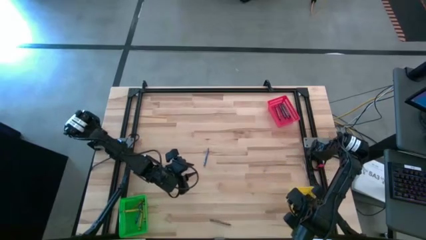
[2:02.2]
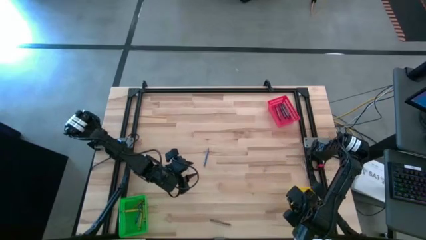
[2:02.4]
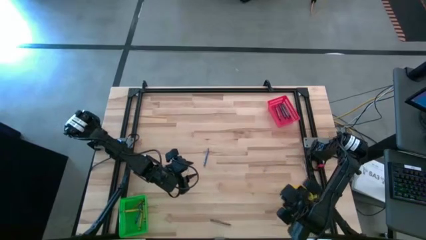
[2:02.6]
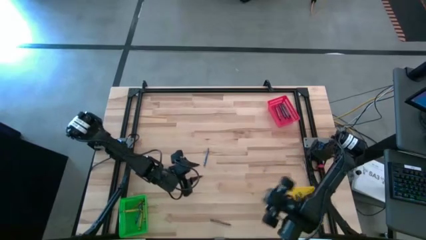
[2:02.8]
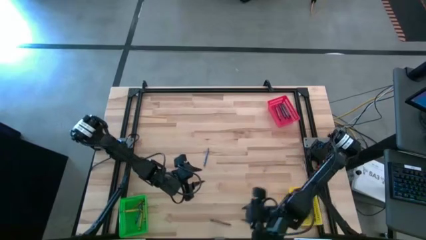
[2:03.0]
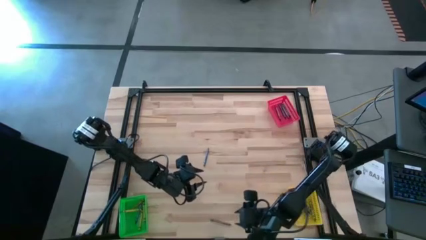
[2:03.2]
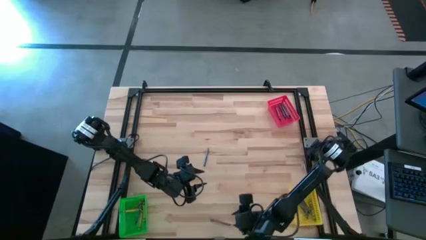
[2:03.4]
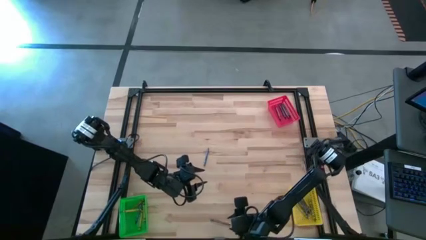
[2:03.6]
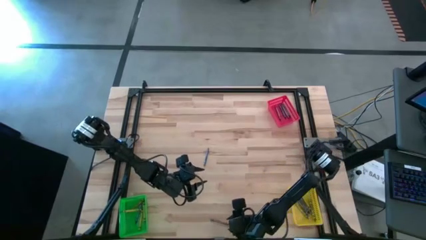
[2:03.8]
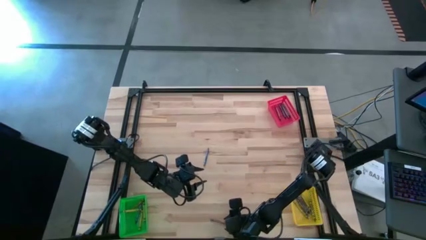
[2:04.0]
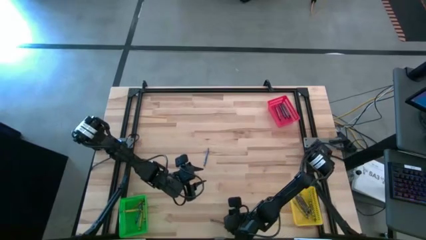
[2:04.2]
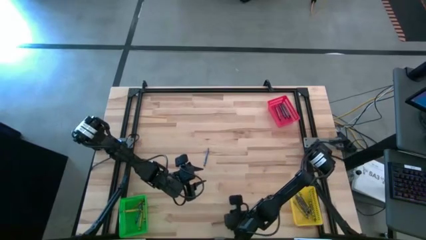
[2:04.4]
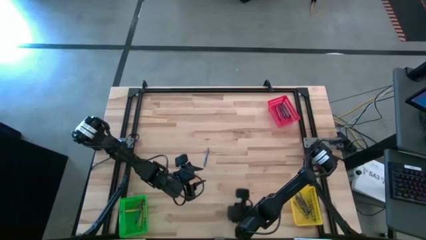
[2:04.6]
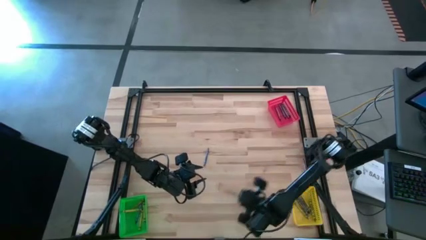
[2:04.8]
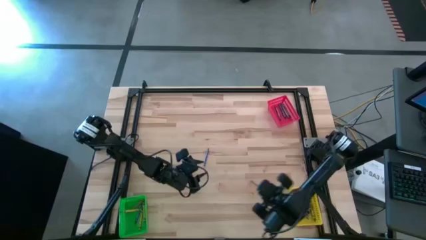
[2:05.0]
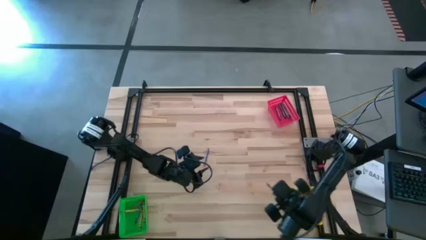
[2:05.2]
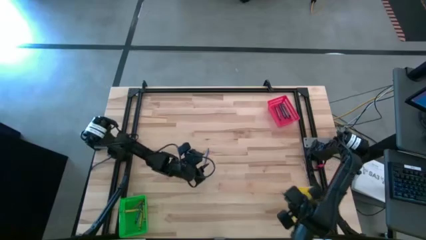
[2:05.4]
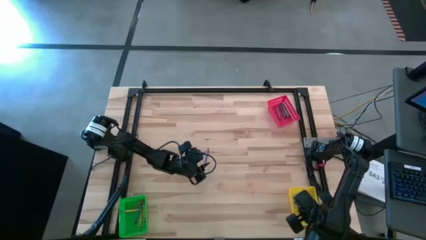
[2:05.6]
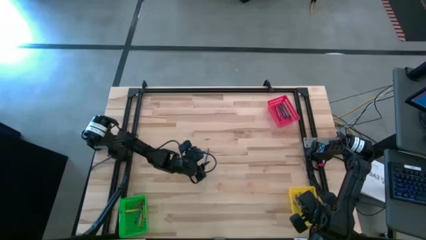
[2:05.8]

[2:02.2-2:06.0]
Task: Sort crayons
Put the brown crayon into the yellow bin

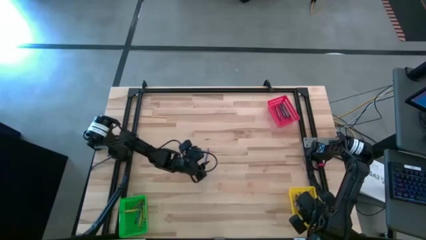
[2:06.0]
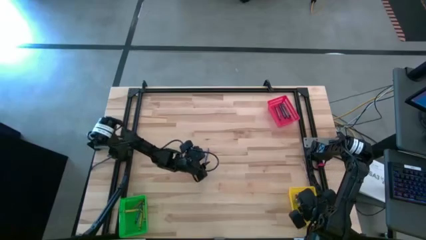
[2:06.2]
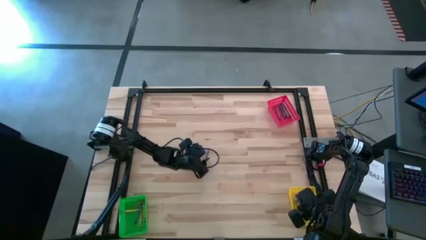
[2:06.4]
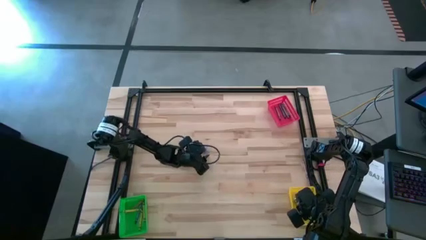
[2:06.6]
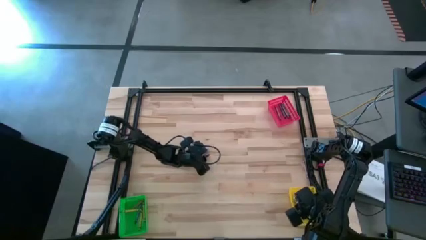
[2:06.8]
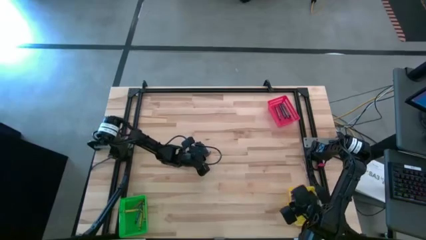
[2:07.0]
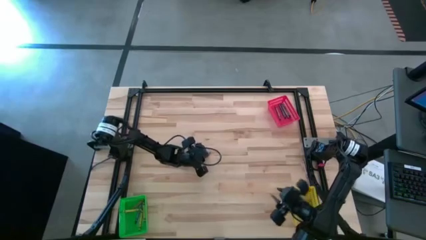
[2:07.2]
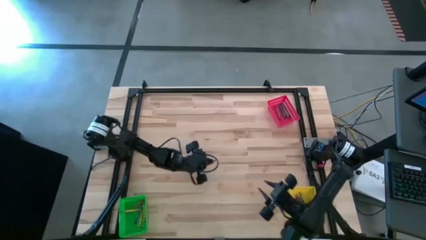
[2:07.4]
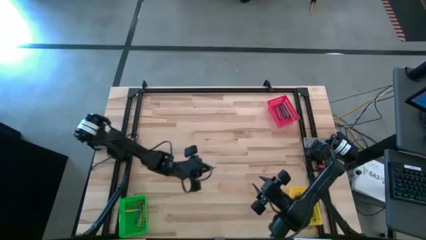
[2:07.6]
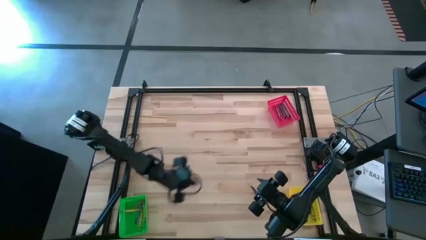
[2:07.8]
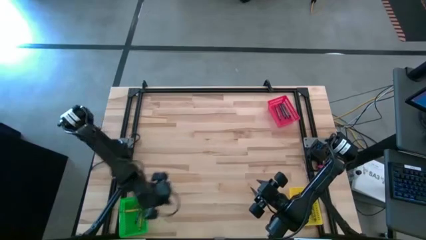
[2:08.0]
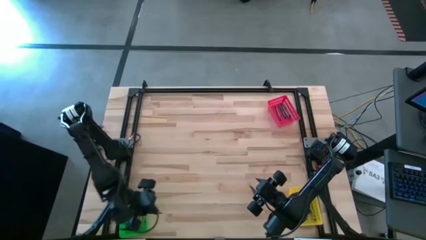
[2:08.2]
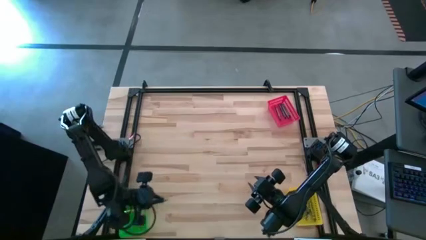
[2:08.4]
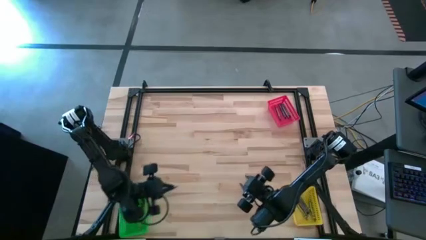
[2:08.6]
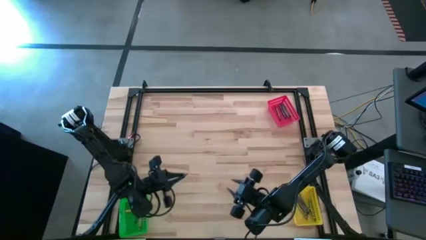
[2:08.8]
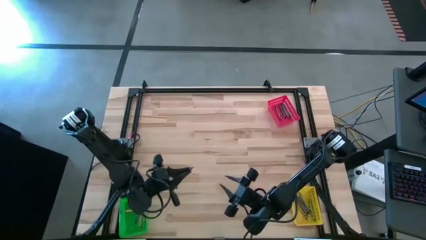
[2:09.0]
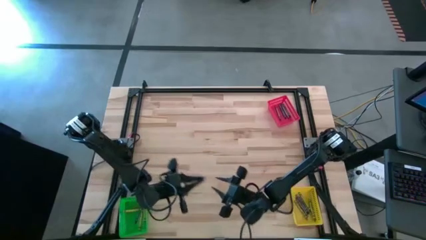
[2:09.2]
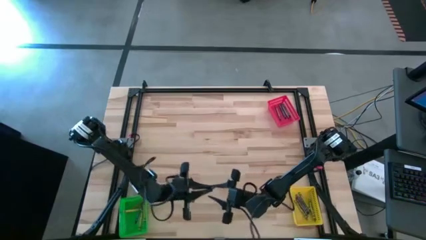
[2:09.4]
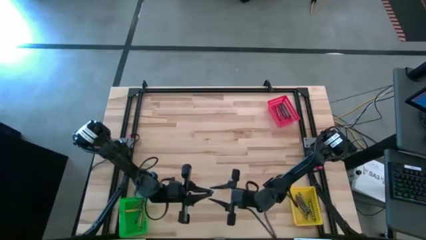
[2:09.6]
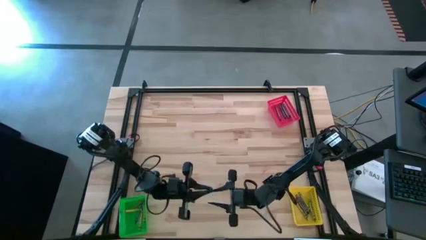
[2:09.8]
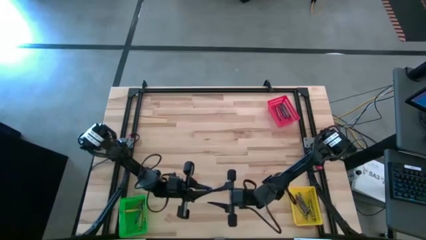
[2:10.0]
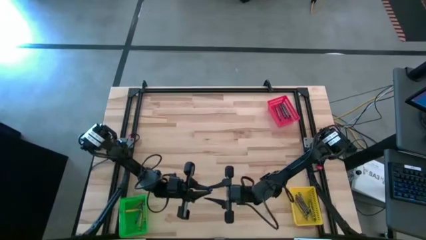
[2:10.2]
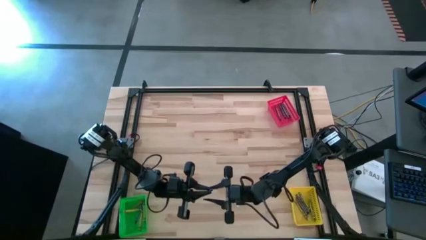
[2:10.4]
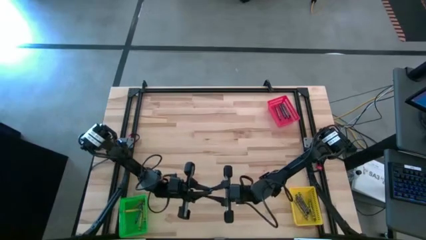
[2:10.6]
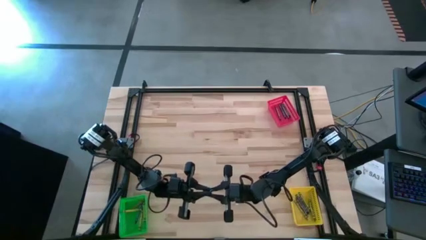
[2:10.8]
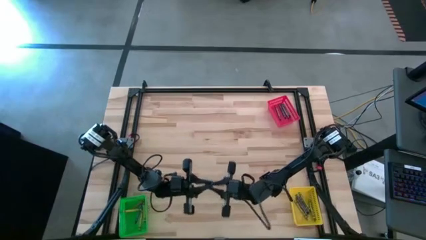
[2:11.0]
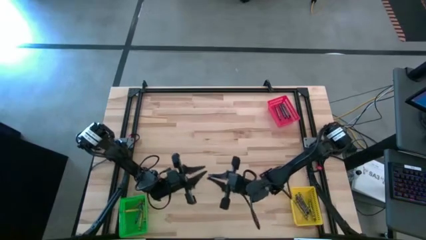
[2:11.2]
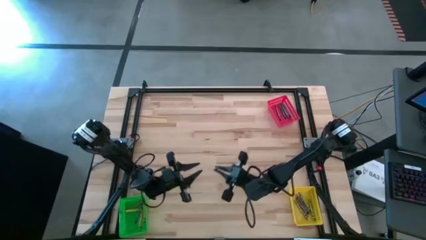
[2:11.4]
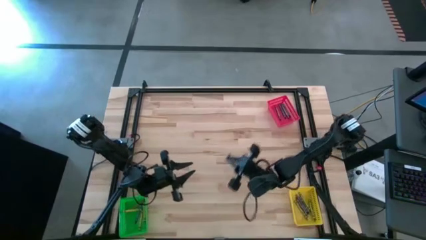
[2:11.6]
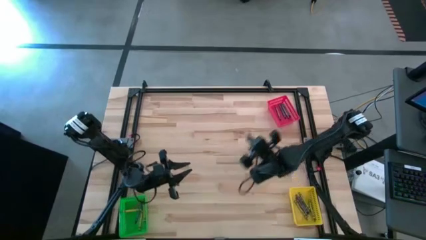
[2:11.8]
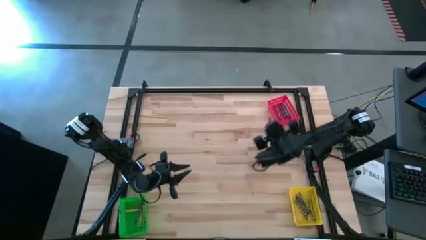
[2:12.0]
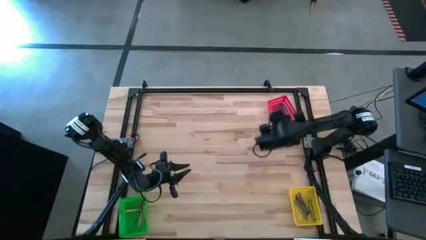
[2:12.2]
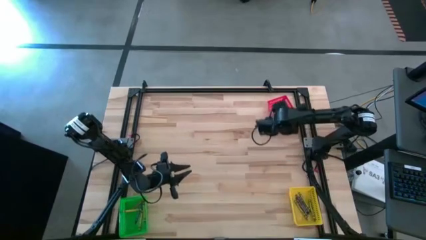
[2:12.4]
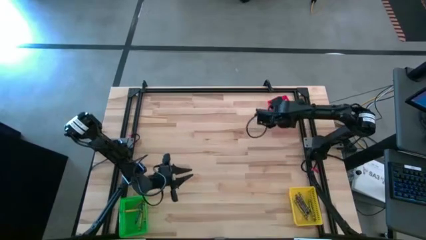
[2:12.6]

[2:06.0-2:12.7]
Put the blue crayon into the red bin

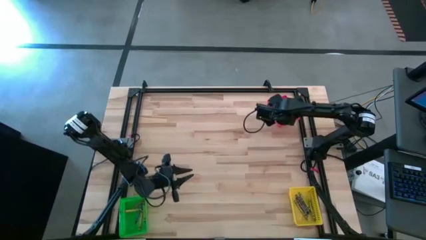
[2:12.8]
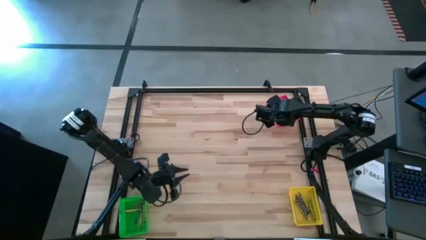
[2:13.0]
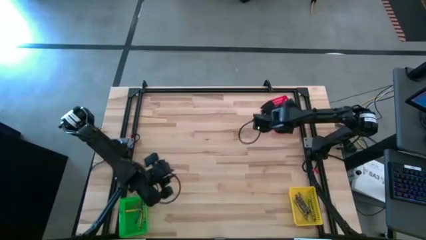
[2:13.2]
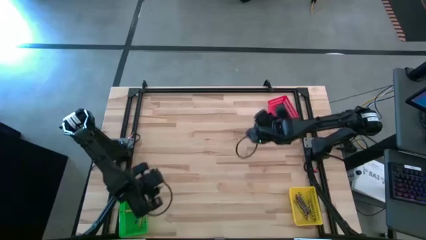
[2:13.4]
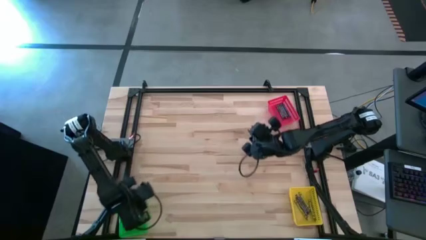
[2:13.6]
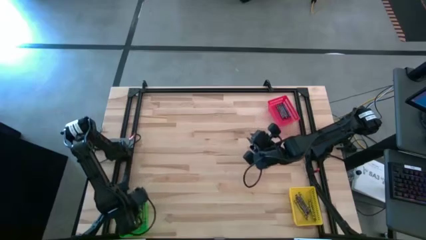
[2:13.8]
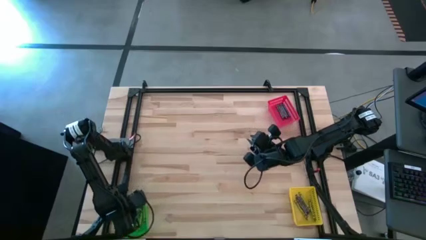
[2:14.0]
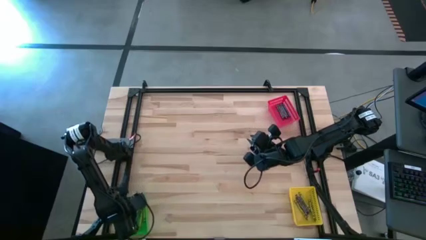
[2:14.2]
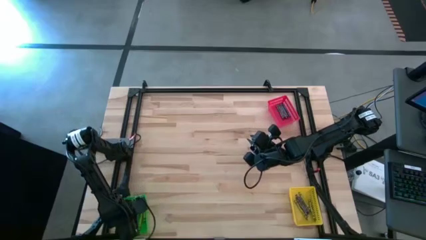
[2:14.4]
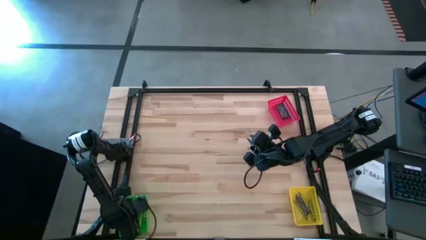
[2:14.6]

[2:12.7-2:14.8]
Adjust the green crayon

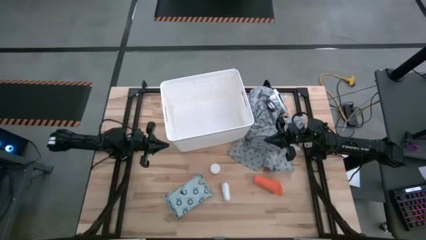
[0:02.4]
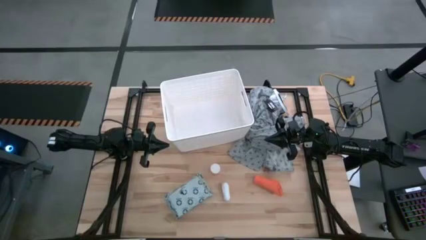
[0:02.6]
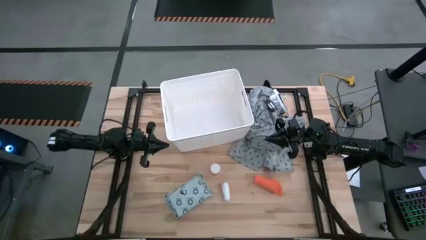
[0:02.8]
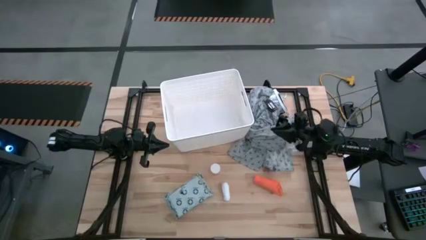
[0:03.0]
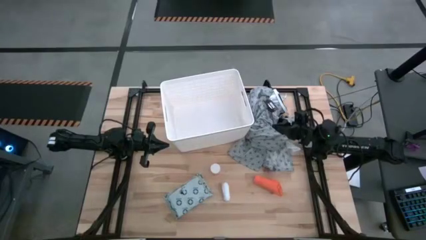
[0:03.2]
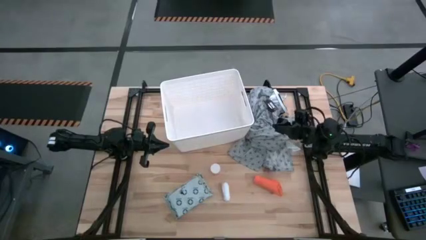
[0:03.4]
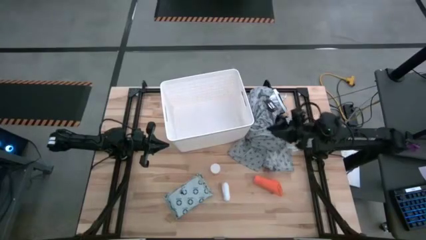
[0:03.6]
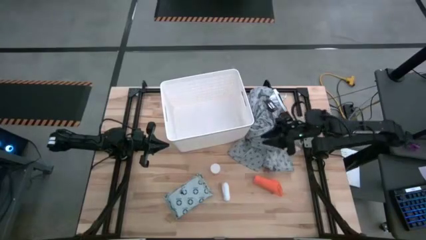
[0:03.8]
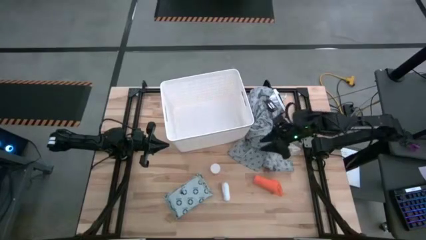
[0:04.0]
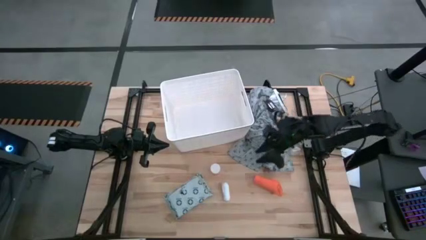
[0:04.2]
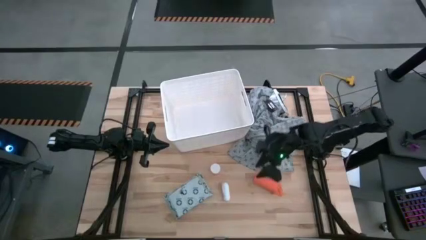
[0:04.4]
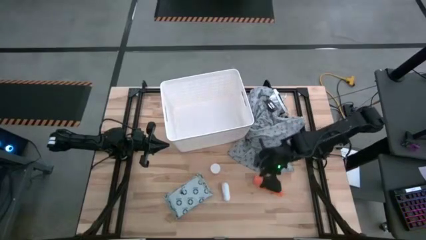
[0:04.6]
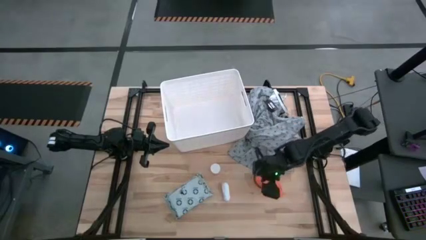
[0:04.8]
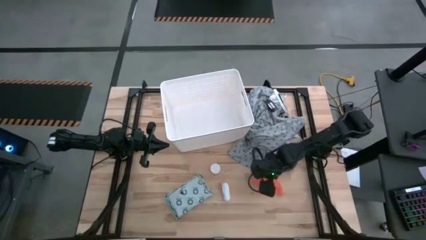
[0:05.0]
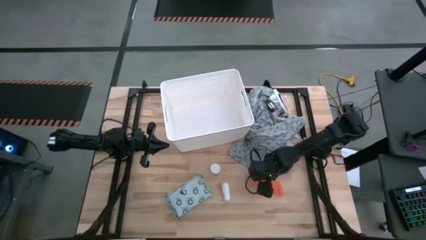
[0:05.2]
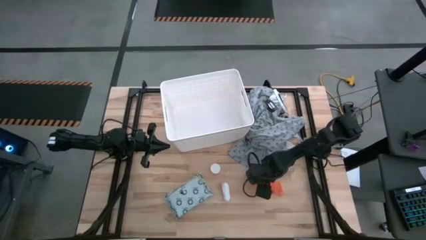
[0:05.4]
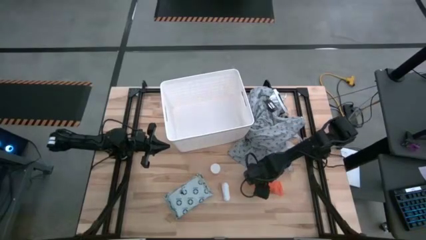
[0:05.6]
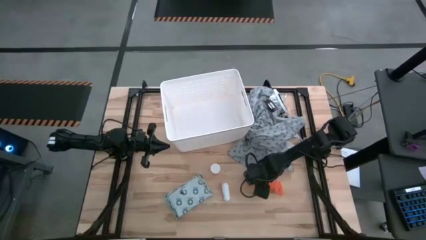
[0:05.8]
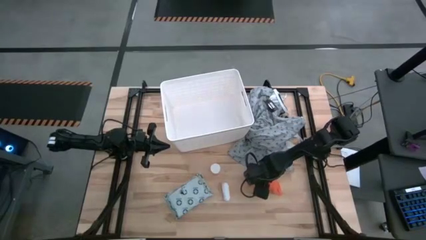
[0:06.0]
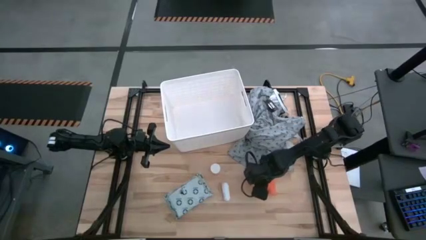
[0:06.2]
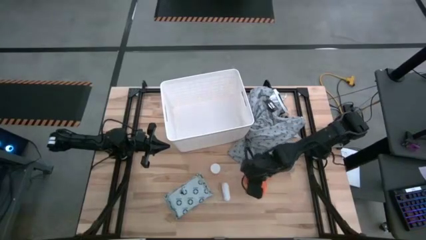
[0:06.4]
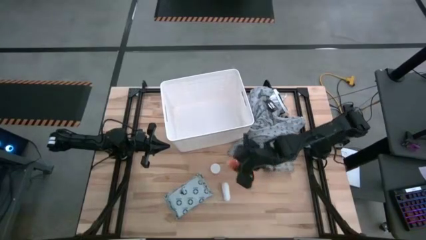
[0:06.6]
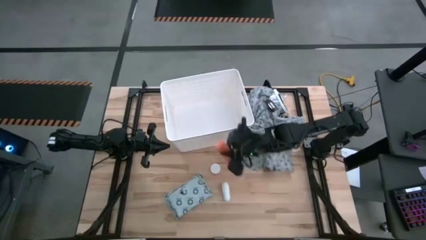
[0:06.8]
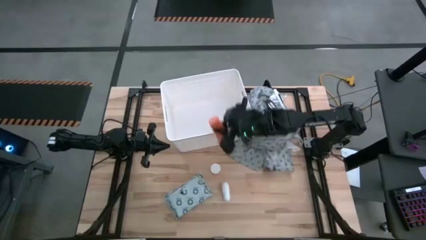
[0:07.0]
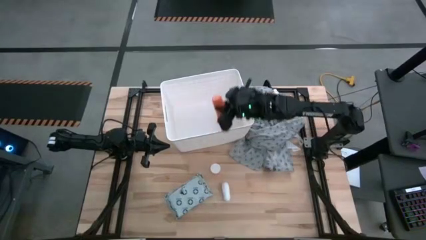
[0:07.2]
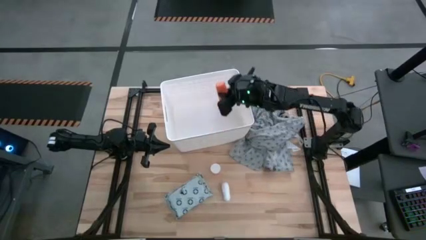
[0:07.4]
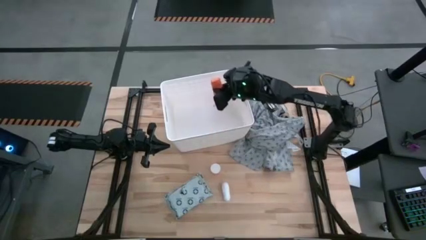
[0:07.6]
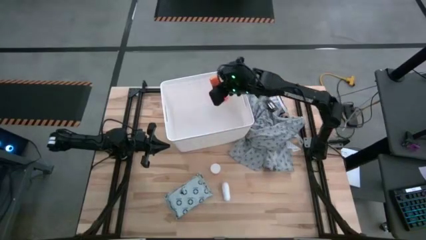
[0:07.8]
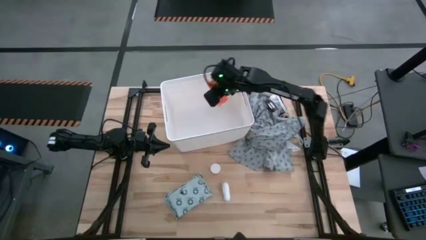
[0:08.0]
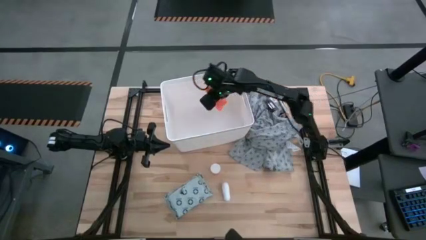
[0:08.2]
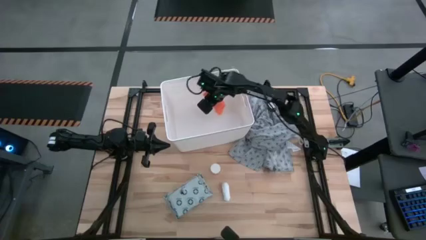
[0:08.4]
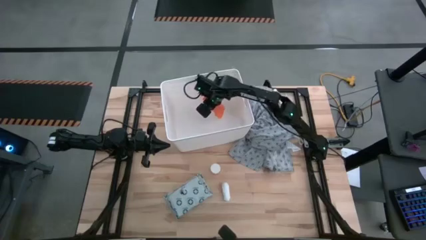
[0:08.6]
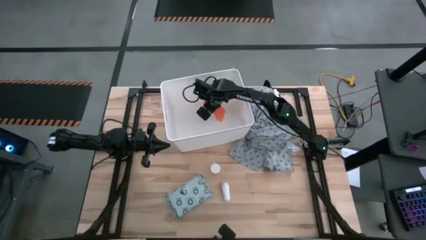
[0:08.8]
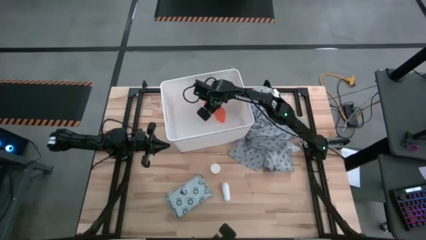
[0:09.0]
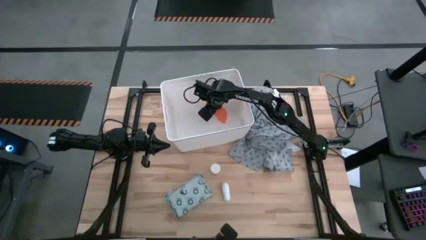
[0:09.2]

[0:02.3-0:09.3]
Task: Pick & place medical supplies in basket/bin
Put the orange bandage into the white bin
